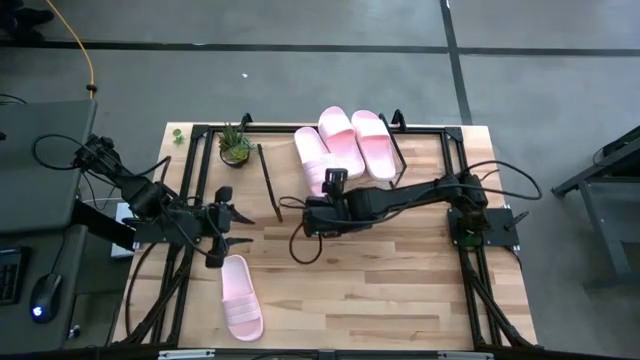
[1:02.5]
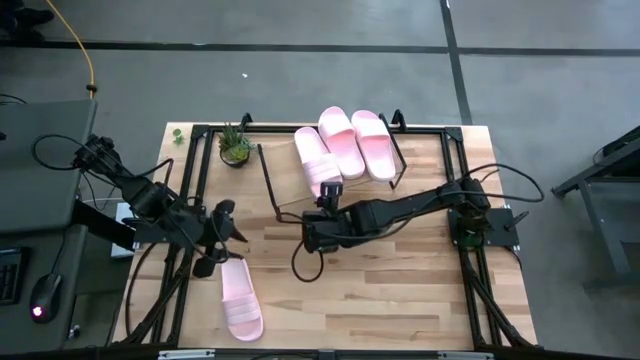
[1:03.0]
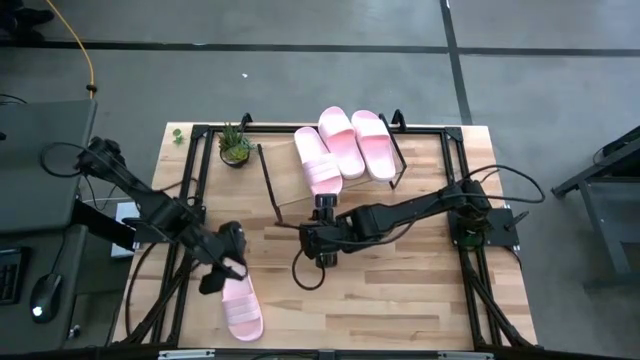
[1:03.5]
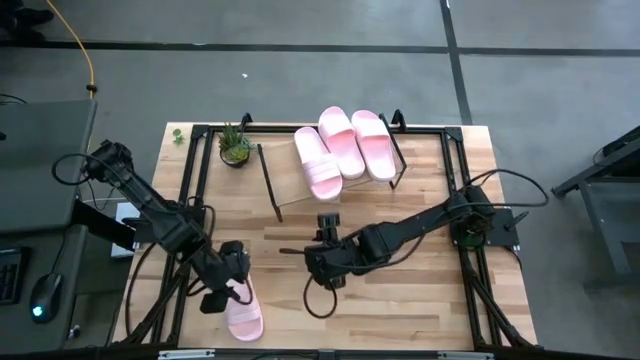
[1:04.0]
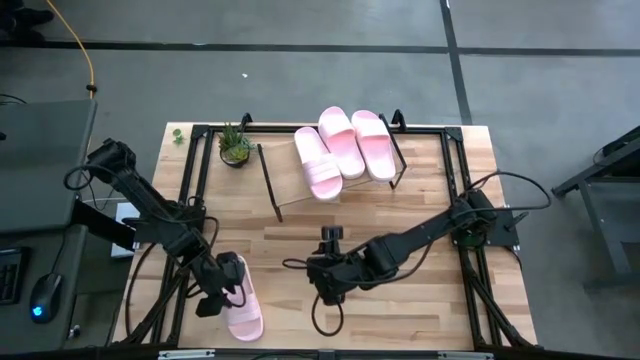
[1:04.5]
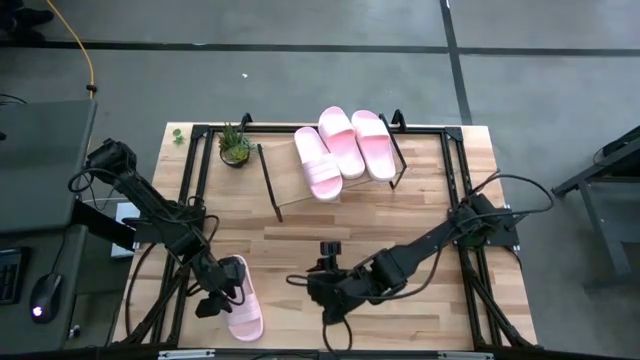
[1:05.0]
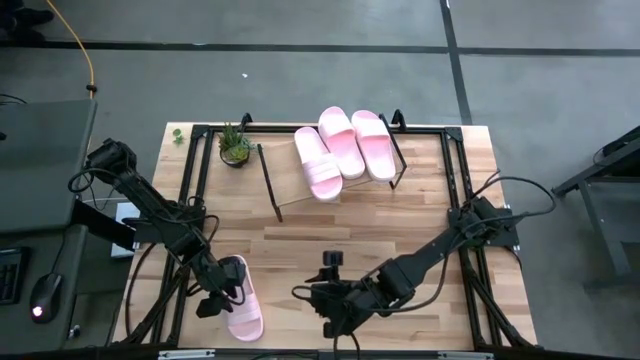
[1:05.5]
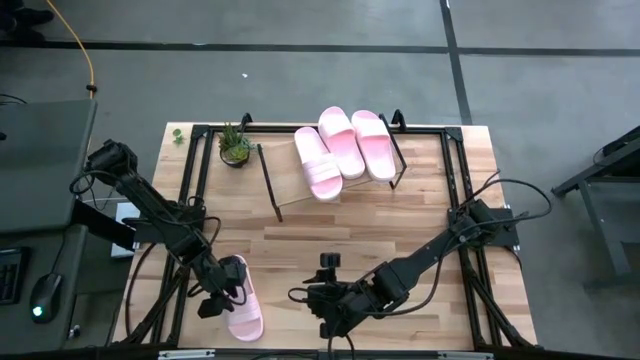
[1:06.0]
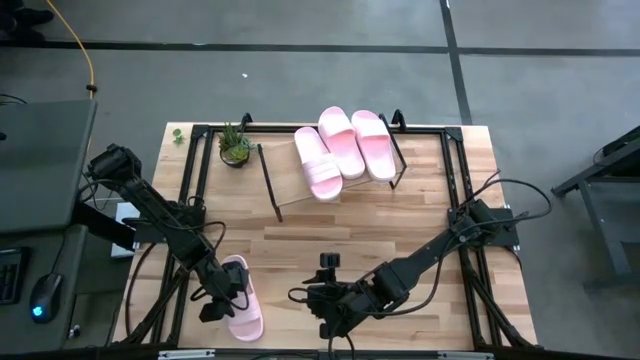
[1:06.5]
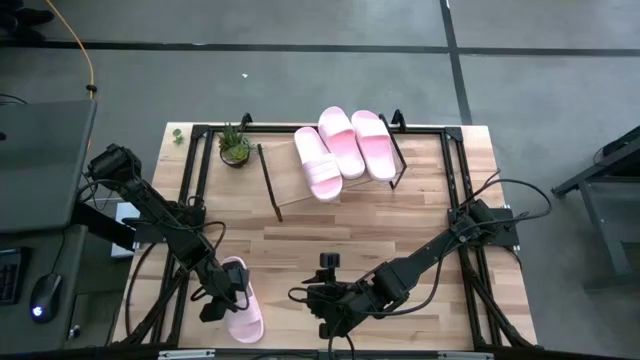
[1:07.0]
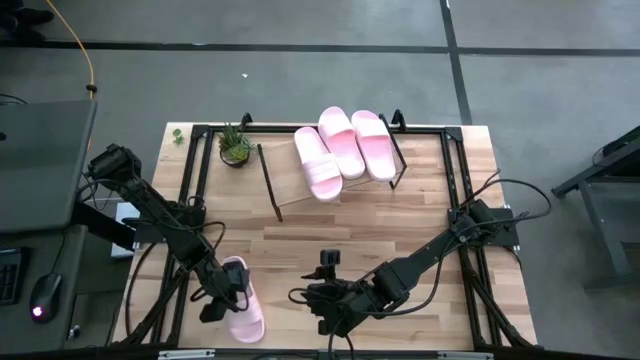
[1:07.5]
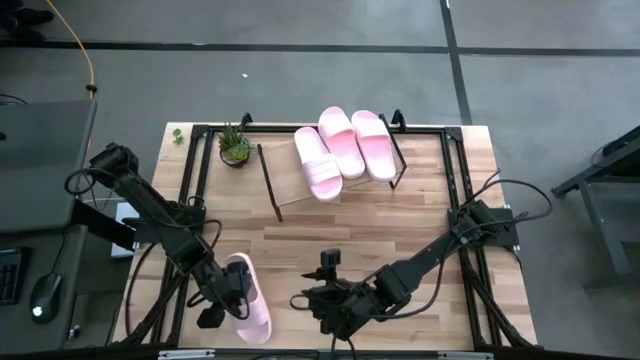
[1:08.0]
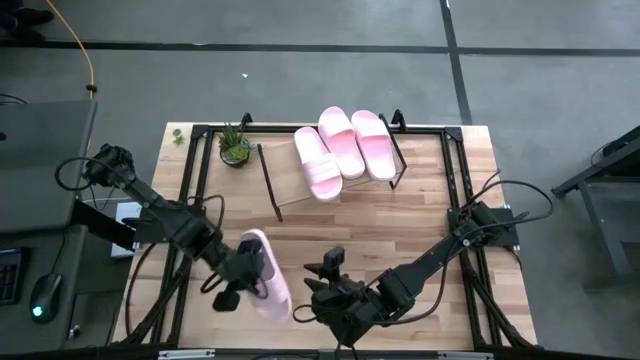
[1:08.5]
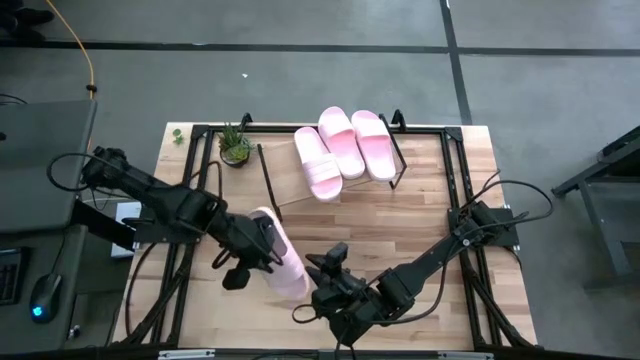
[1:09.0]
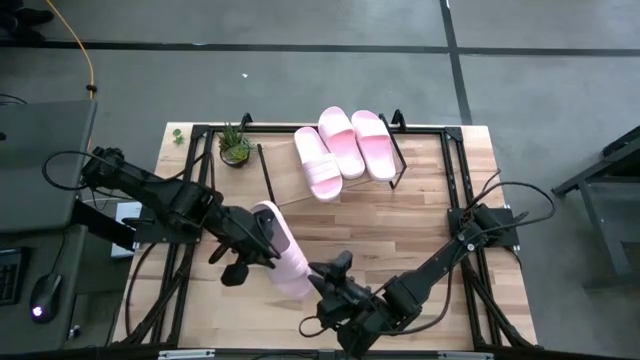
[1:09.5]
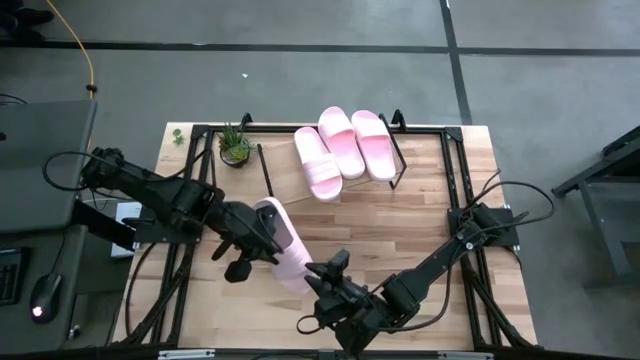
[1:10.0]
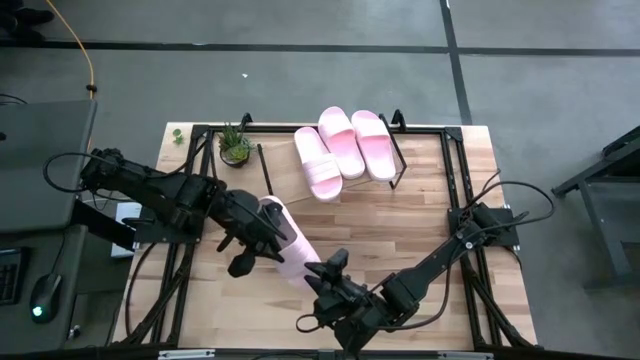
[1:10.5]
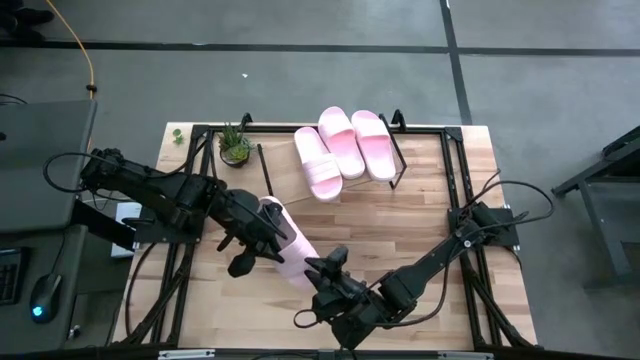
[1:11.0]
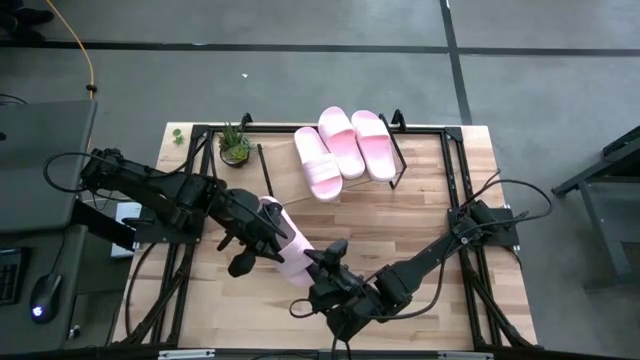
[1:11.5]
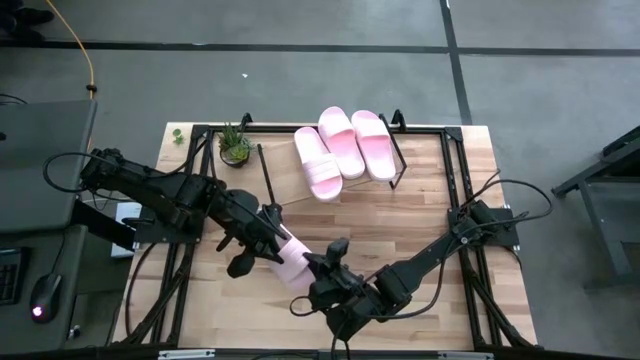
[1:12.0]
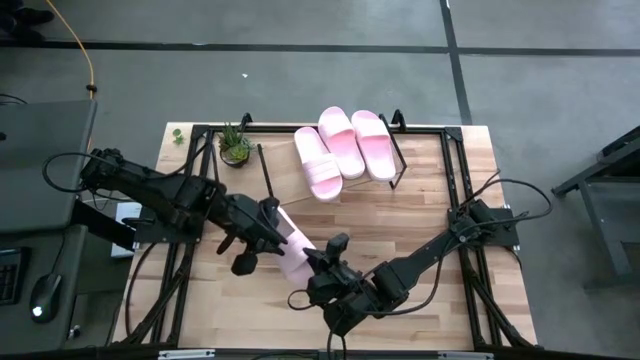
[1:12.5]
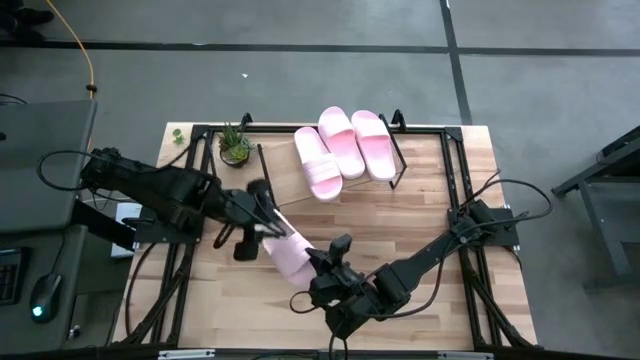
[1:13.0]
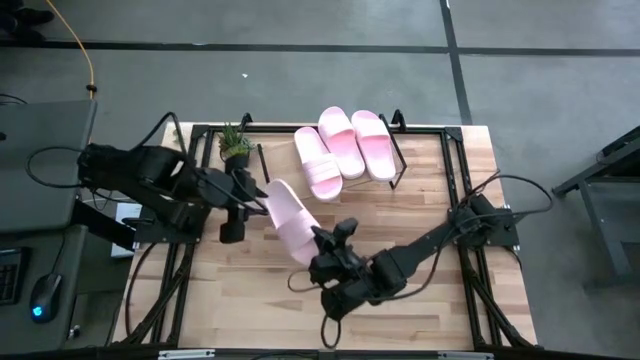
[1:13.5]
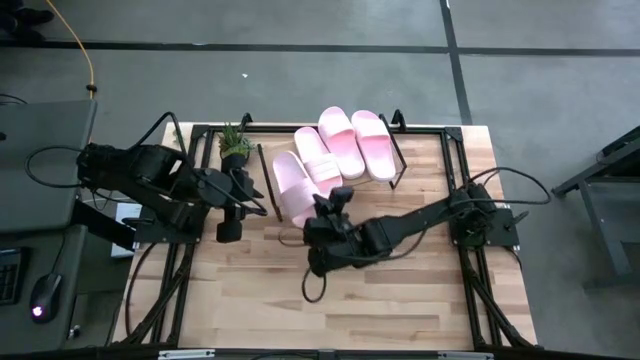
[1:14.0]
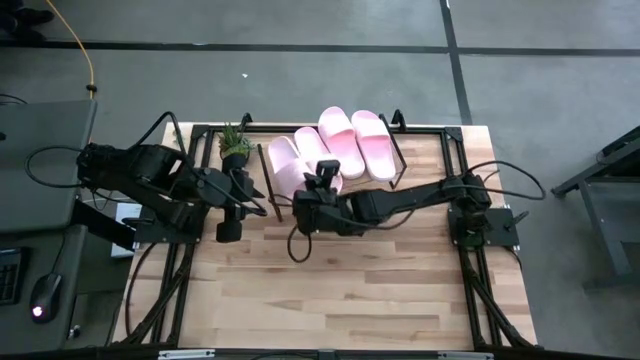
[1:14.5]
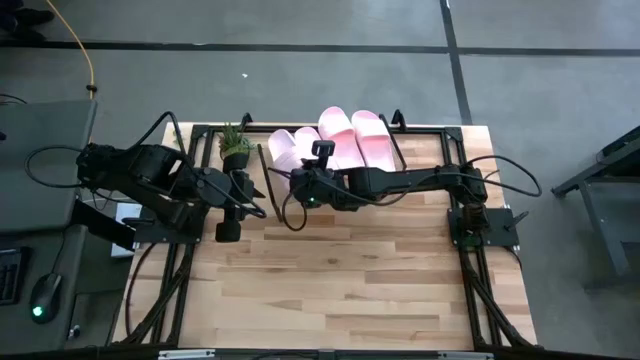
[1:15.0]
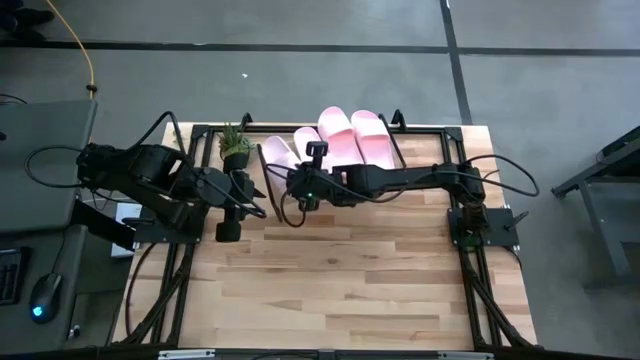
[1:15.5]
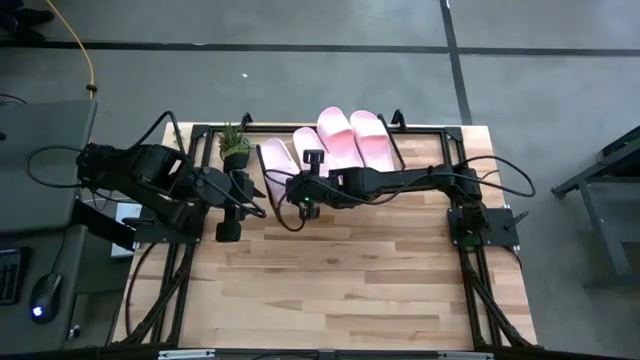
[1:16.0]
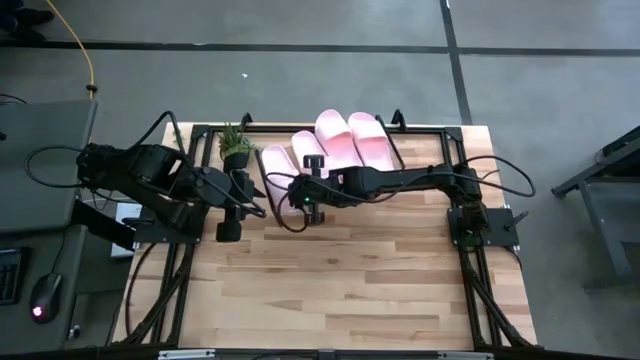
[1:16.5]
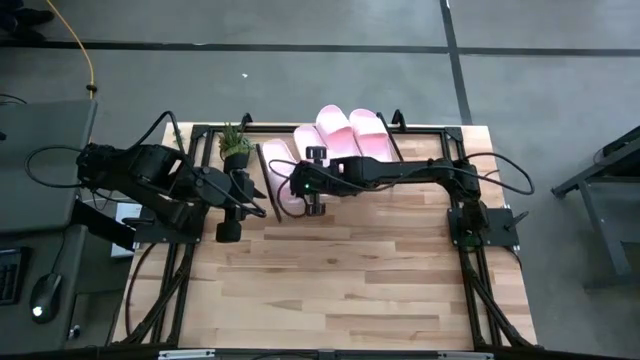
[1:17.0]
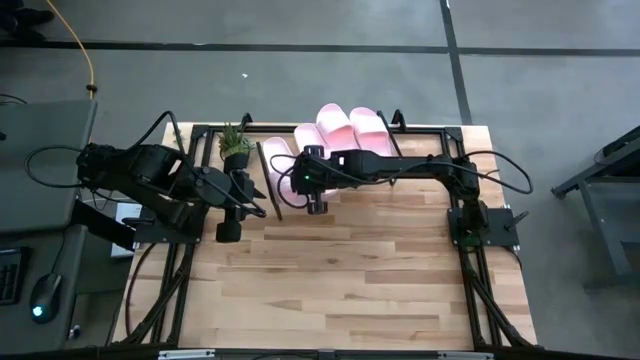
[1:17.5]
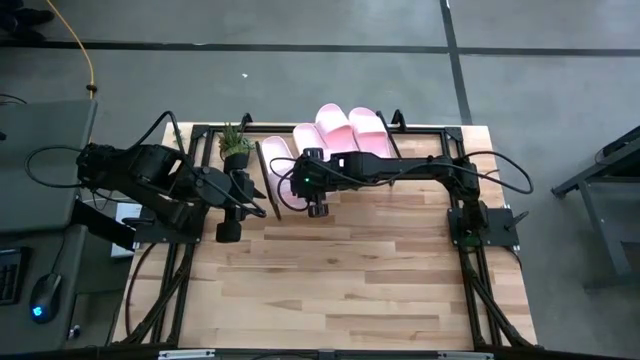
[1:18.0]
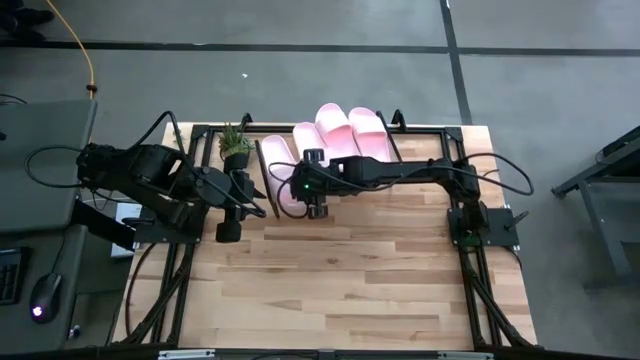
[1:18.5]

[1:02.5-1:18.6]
Task: Pick and place slides into the shelf
Put the pink slide on the shelf

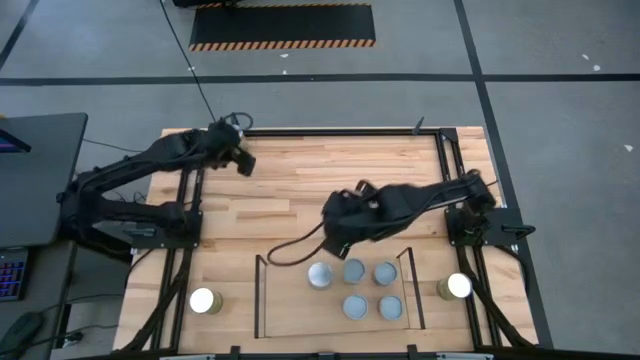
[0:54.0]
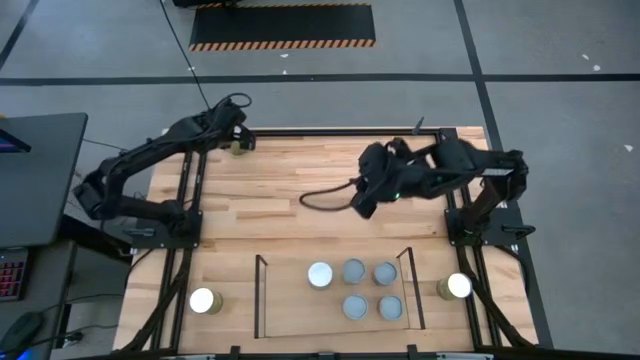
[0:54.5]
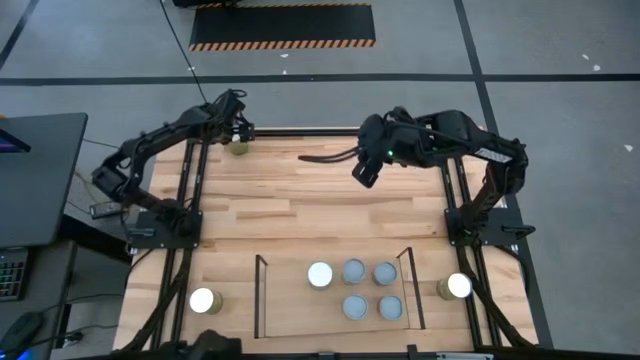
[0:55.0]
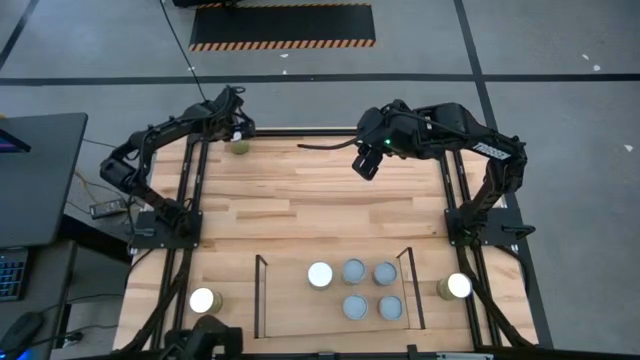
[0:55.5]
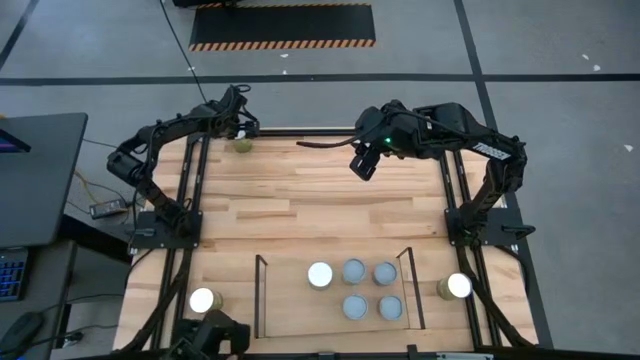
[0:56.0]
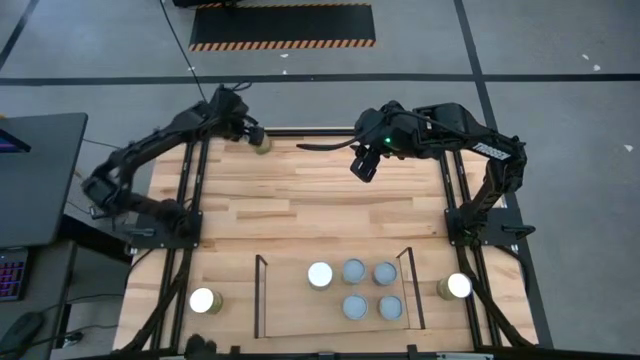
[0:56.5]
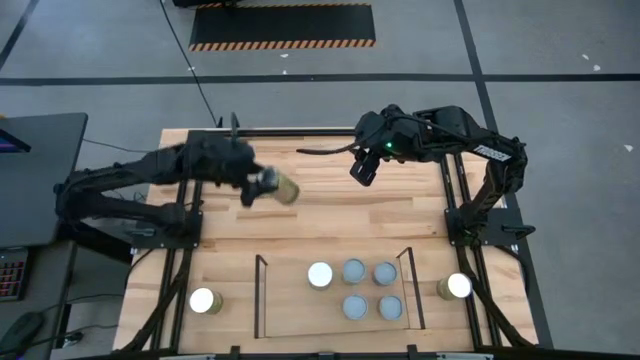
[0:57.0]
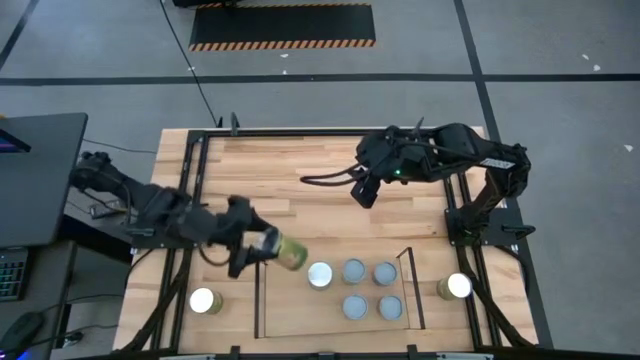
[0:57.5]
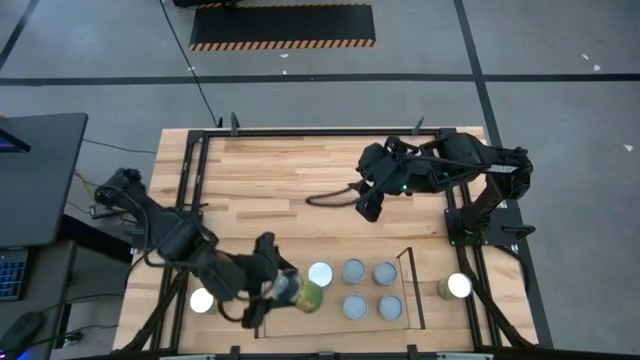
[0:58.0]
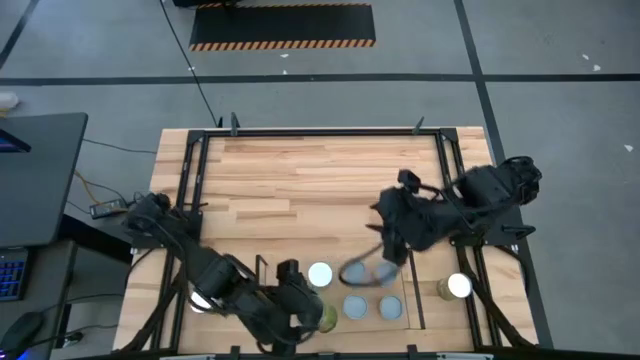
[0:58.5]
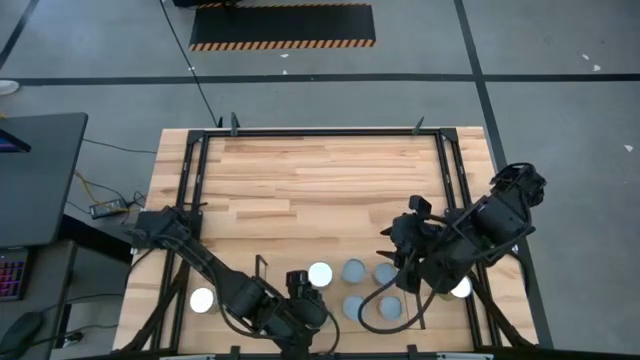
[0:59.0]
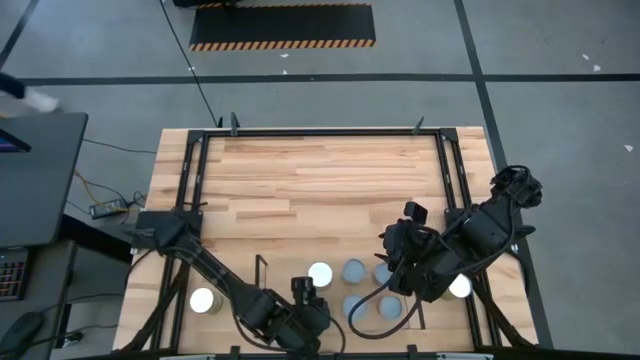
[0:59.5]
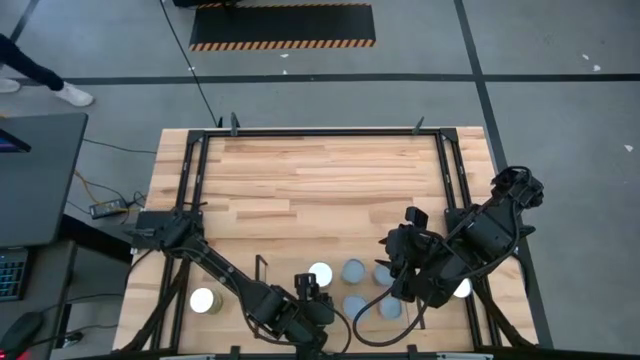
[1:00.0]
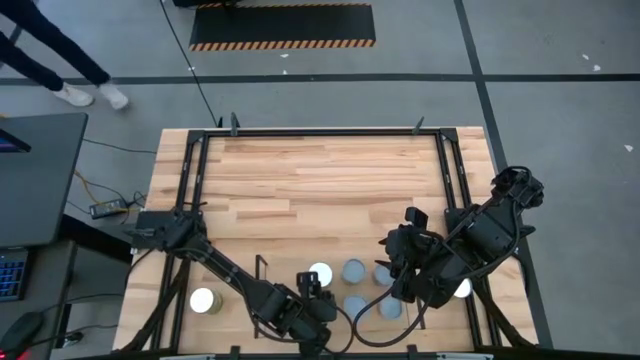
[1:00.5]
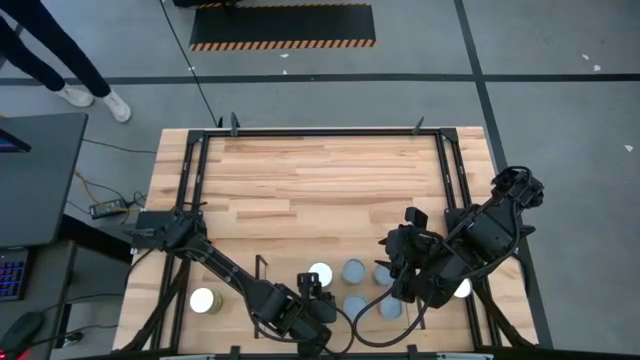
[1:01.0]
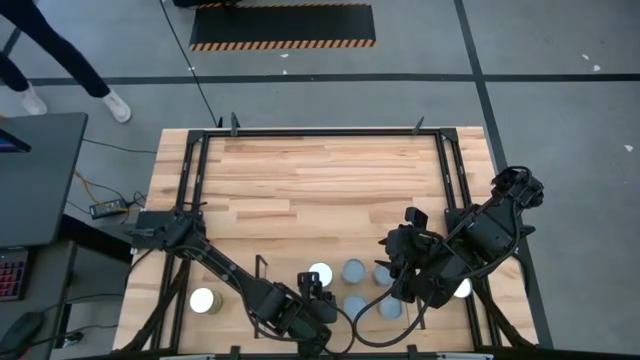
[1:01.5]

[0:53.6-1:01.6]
Task: Pick and place cans onto a shelf
Put the canned oranges on the shelf aligned with the other canned oranges
